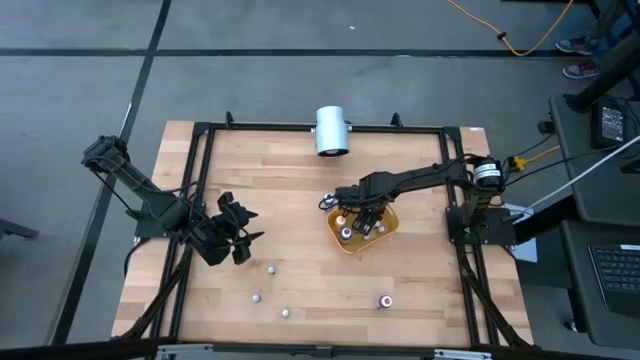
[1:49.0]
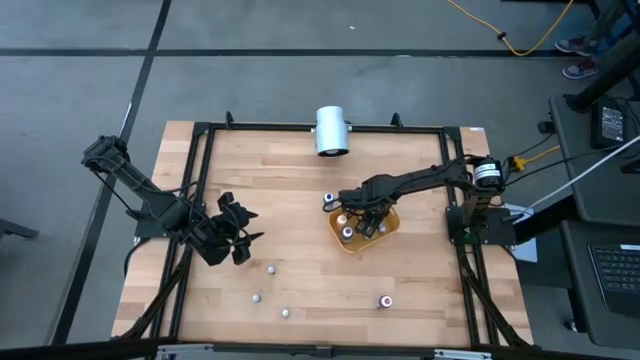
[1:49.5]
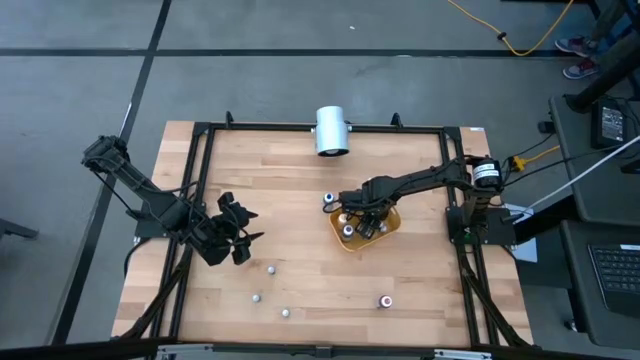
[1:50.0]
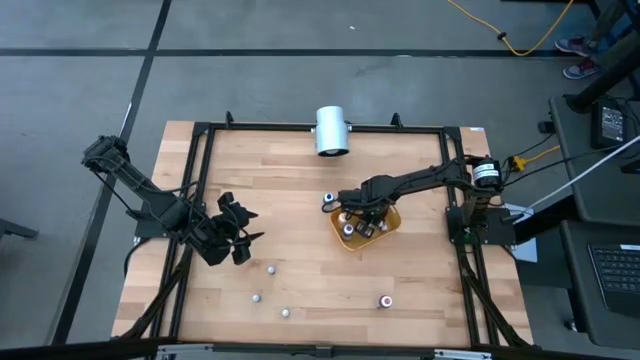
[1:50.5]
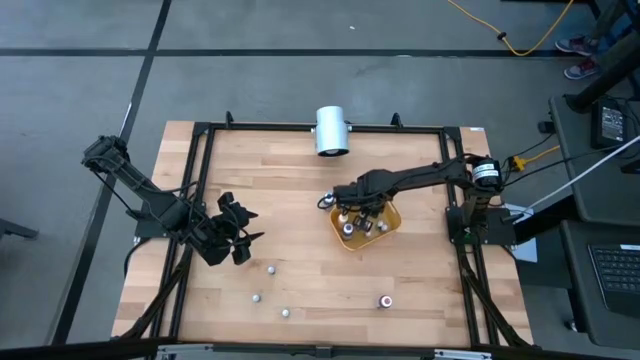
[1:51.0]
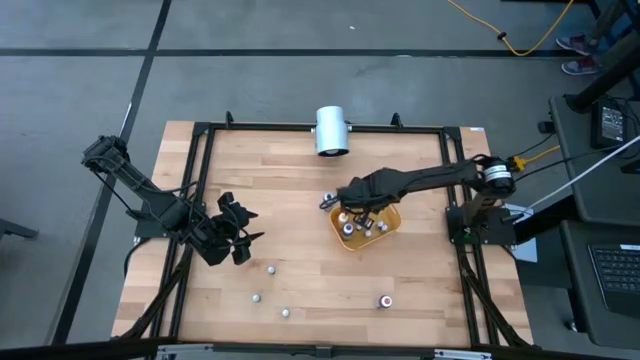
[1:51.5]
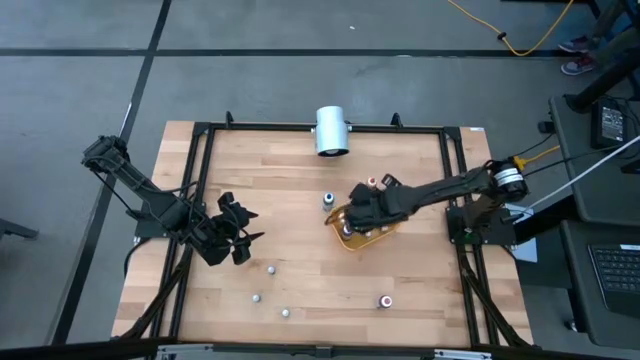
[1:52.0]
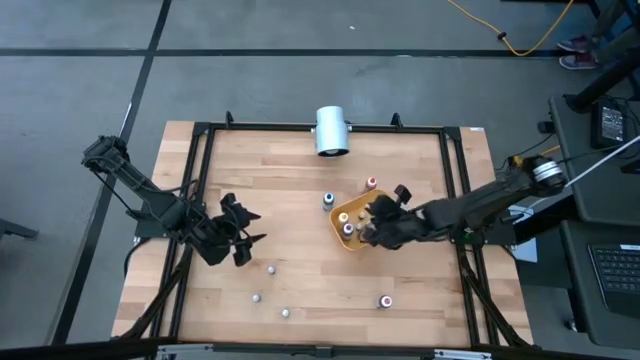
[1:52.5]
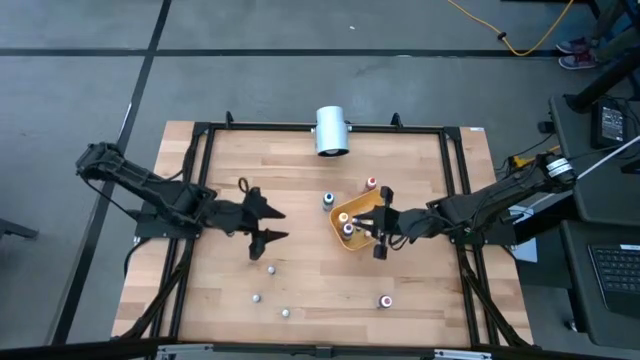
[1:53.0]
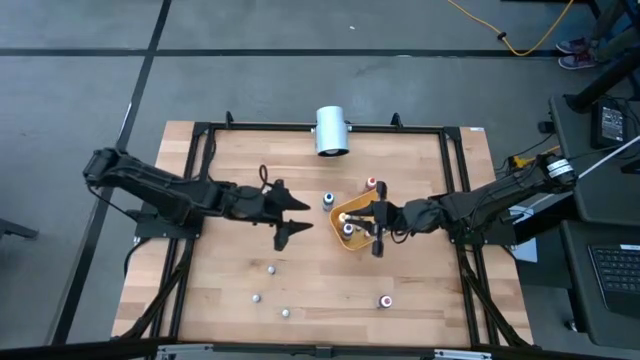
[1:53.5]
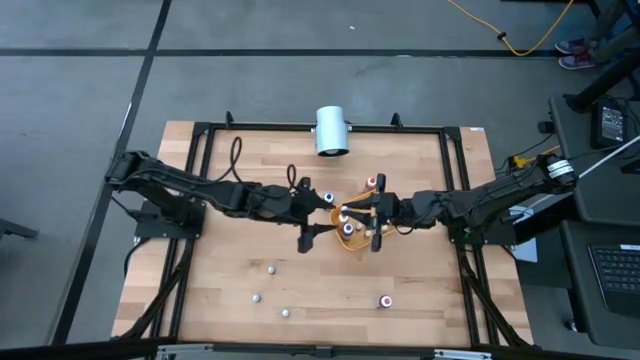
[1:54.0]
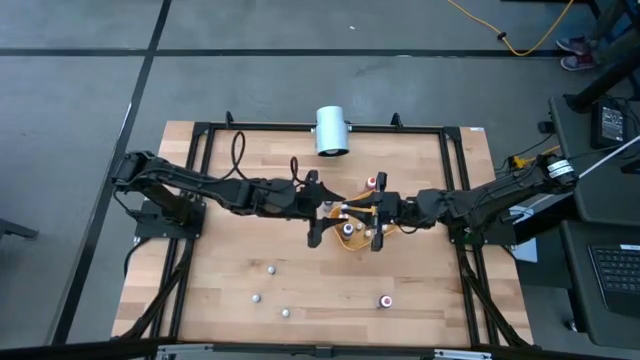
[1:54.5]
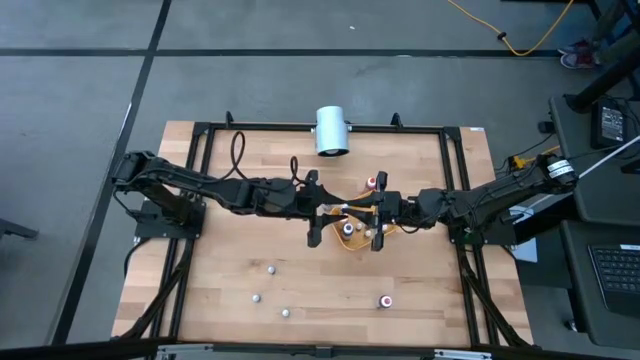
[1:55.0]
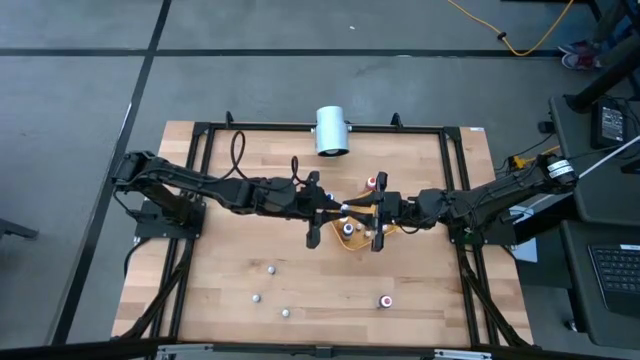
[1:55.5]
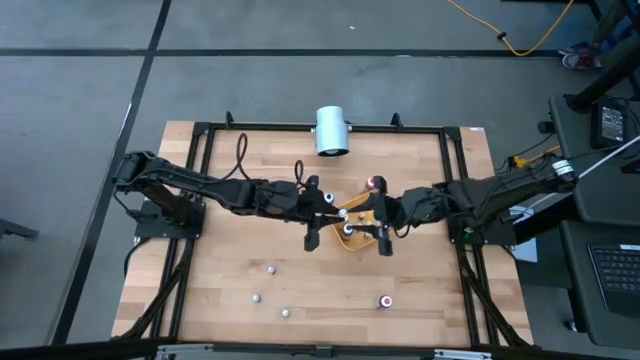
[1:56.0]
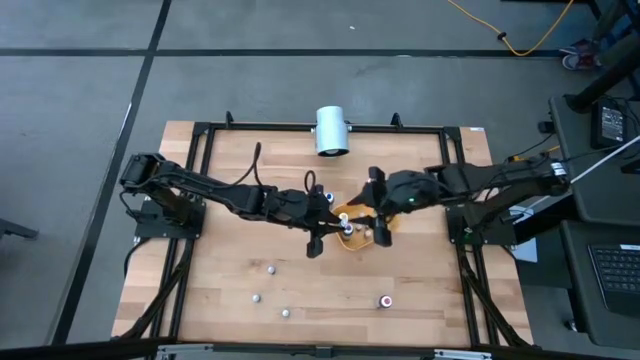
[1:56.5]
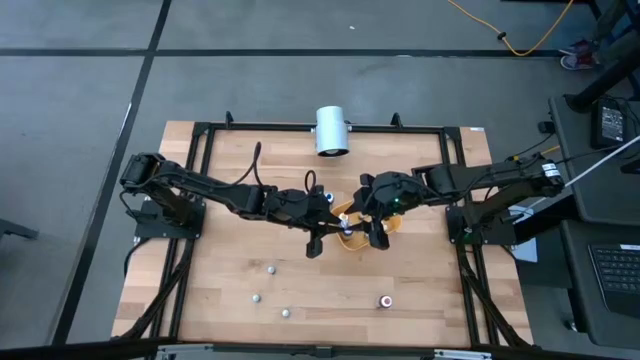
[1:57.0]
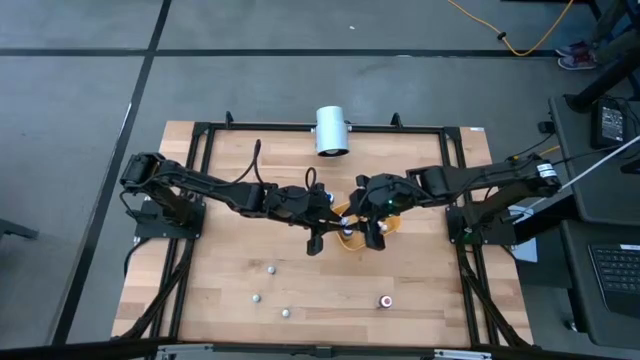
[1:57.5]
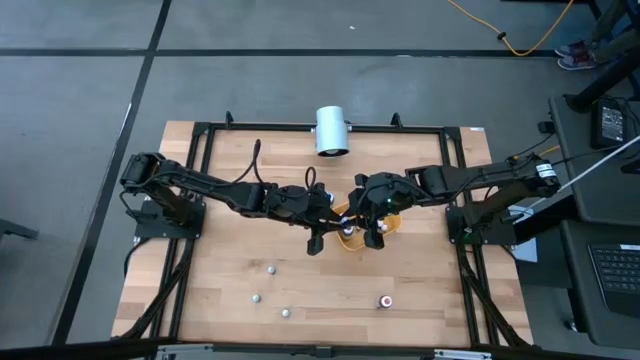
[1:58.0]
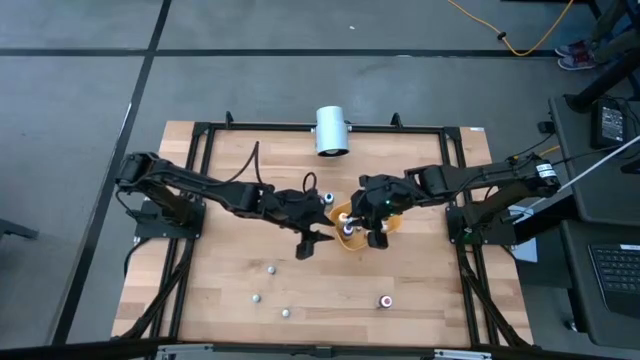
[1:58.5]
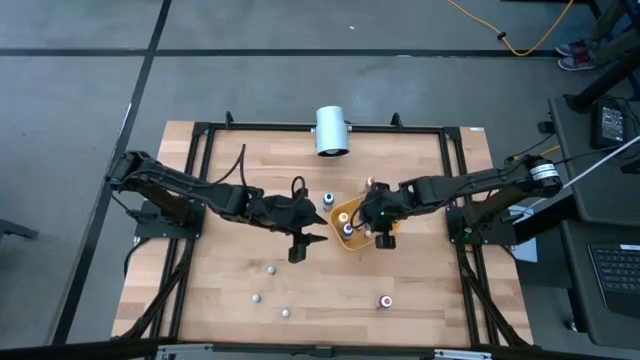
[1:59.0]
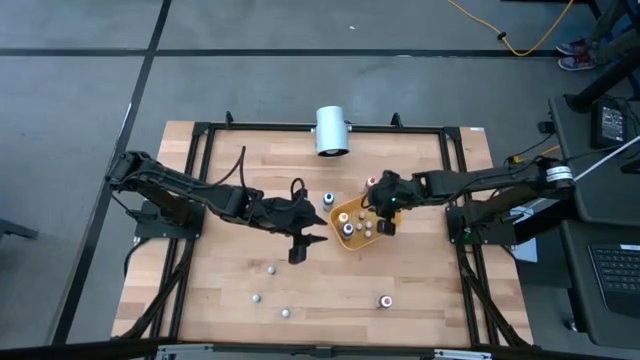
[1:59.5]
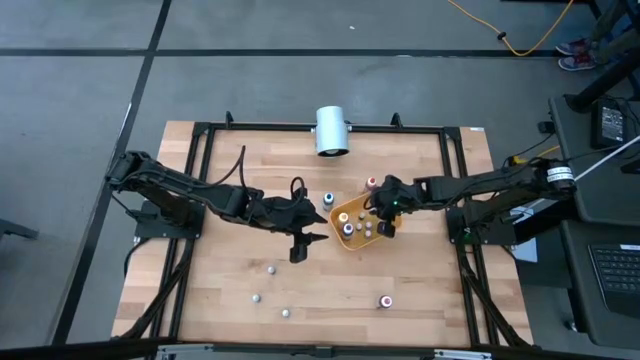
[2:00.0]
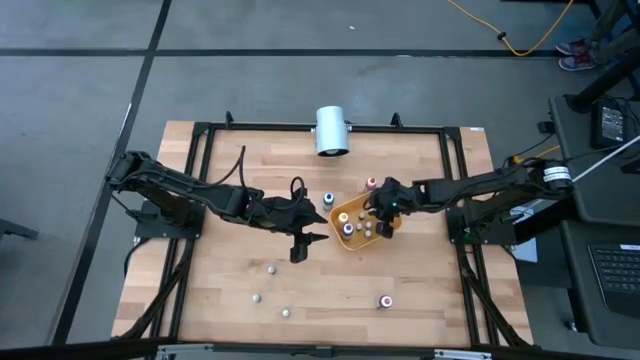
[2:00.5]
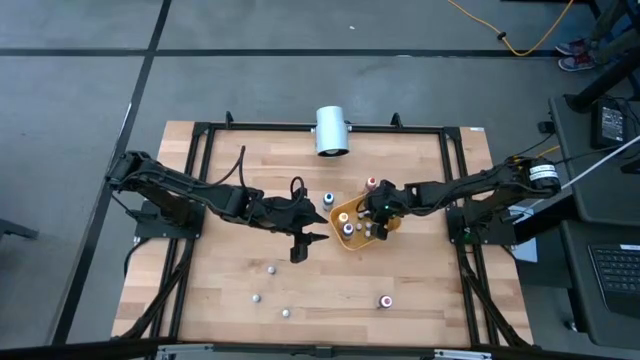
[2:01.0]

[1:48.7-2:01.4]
Task: Pick & Place food coloring
Adjust the red food coloring bottle in the yellow bin

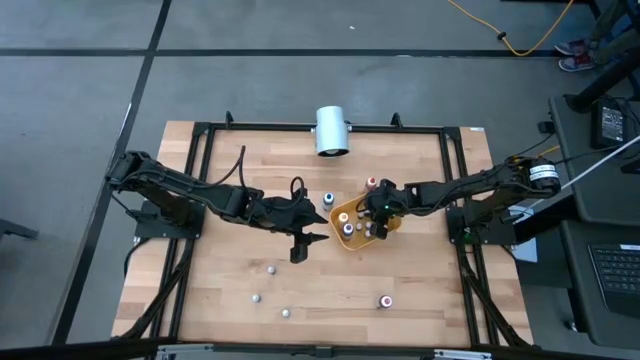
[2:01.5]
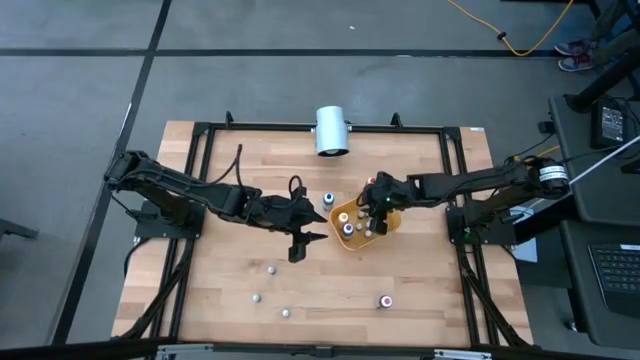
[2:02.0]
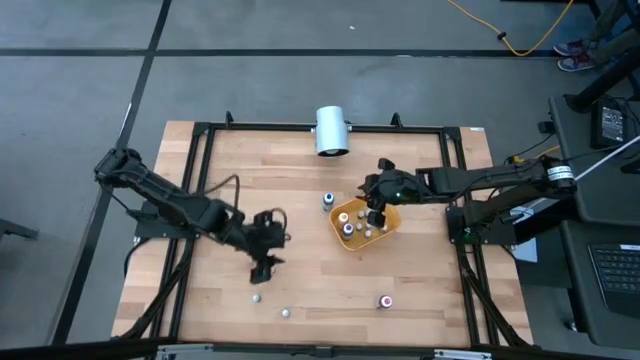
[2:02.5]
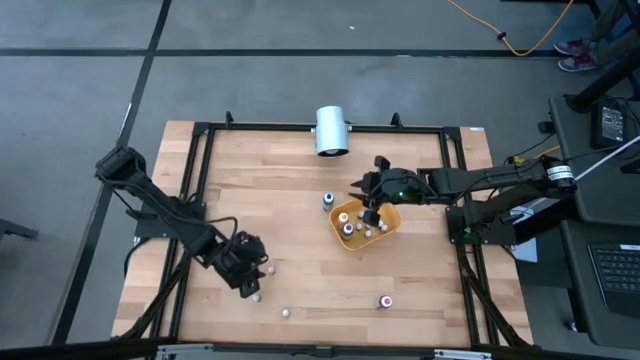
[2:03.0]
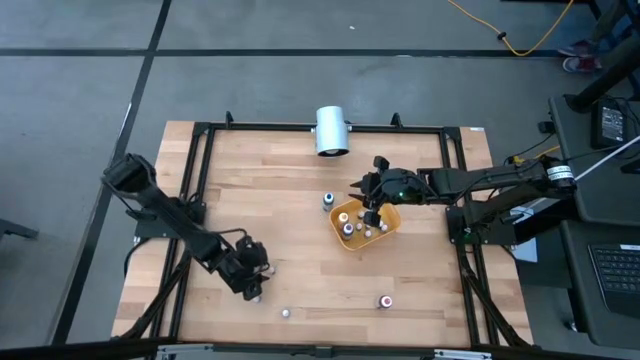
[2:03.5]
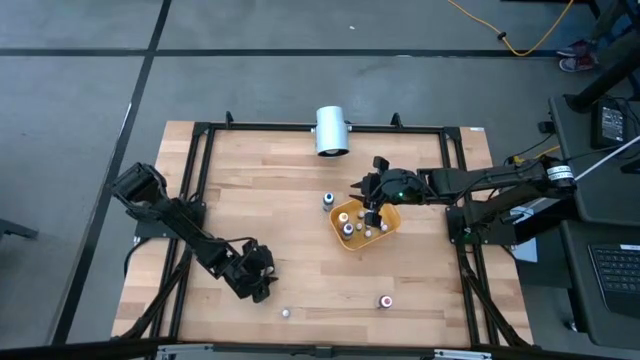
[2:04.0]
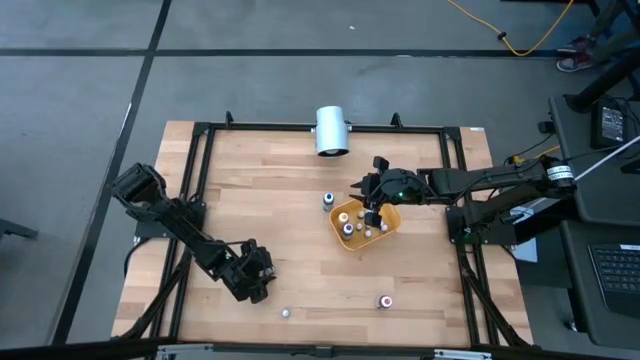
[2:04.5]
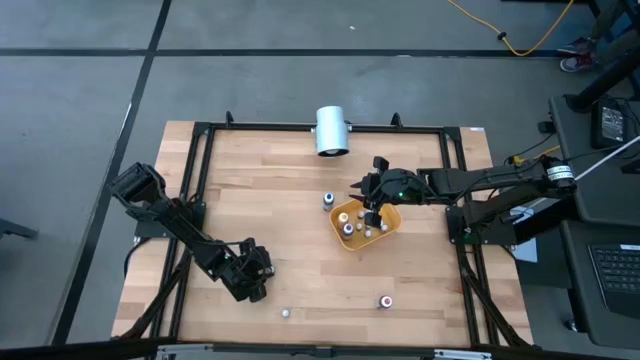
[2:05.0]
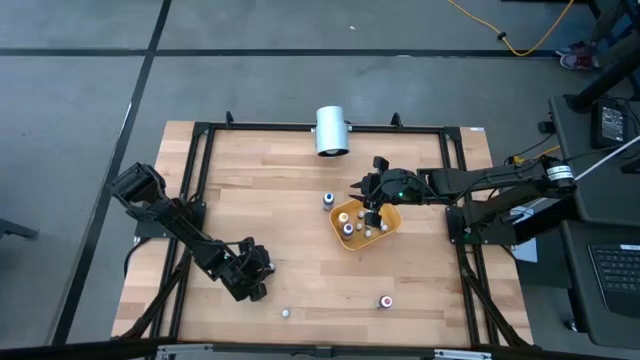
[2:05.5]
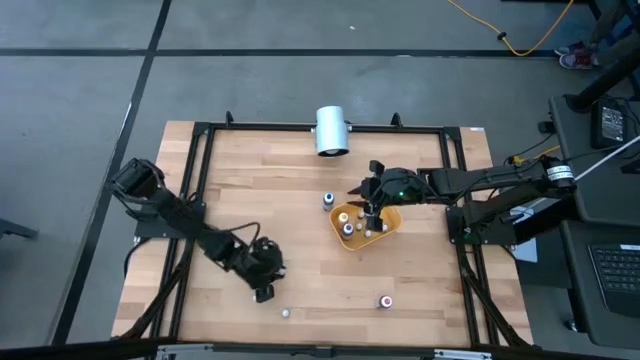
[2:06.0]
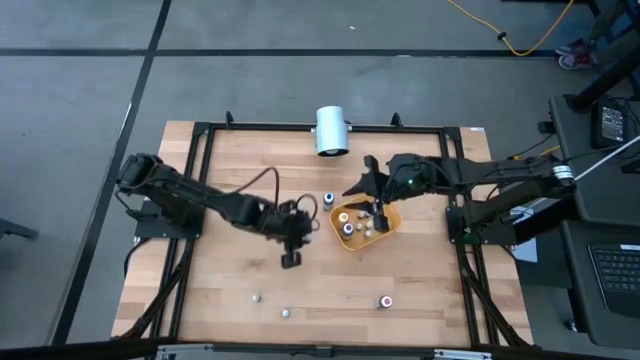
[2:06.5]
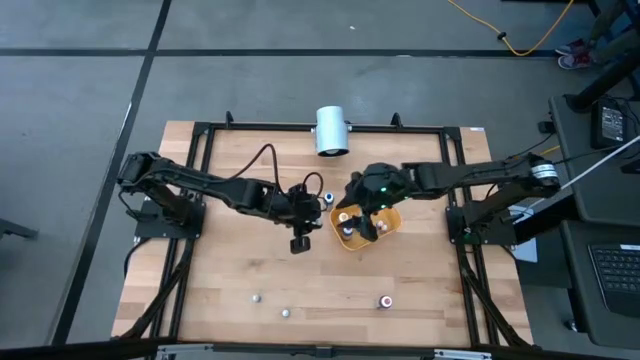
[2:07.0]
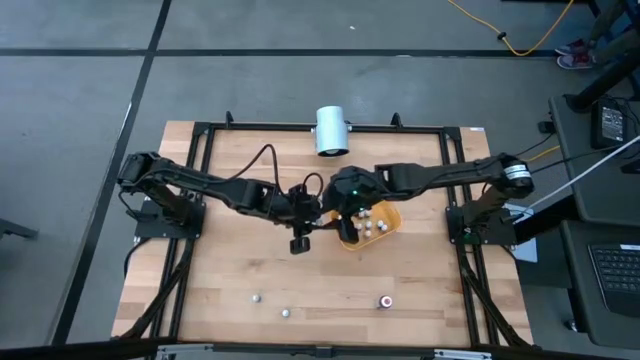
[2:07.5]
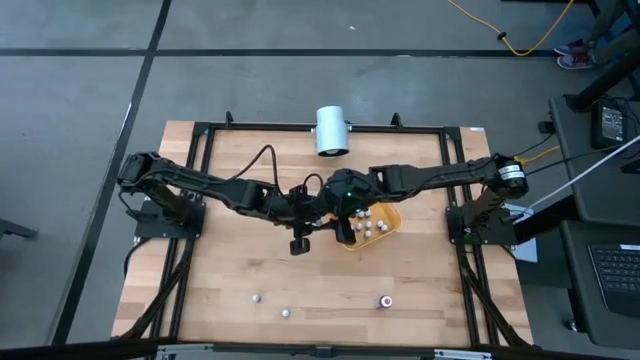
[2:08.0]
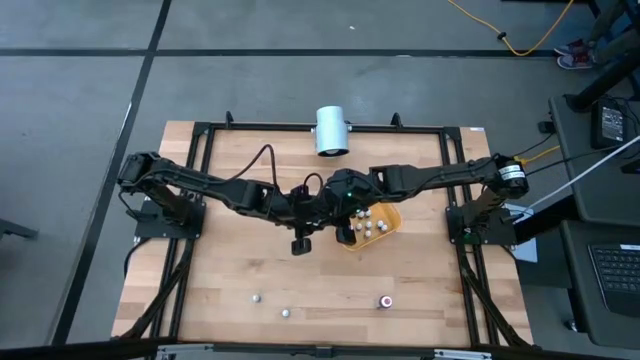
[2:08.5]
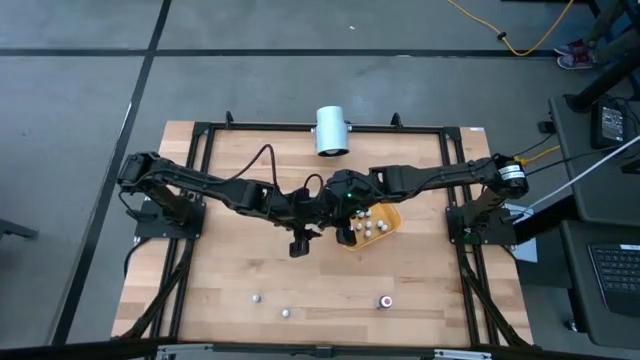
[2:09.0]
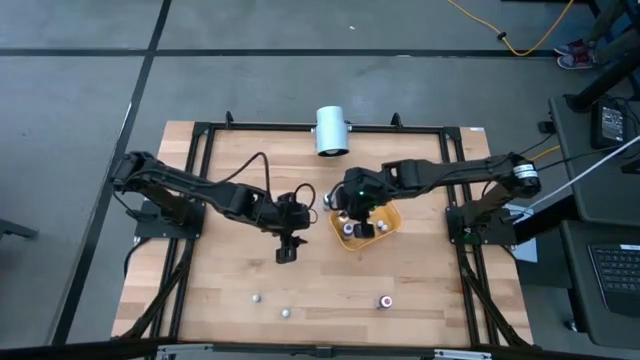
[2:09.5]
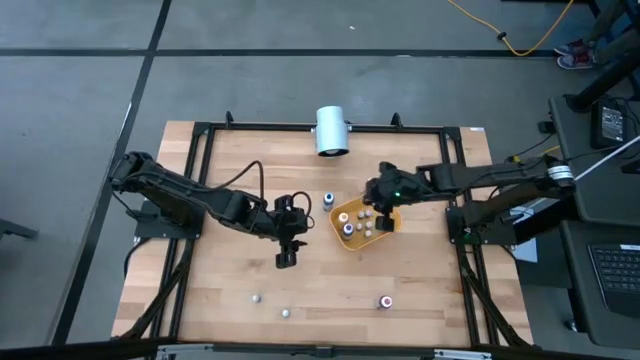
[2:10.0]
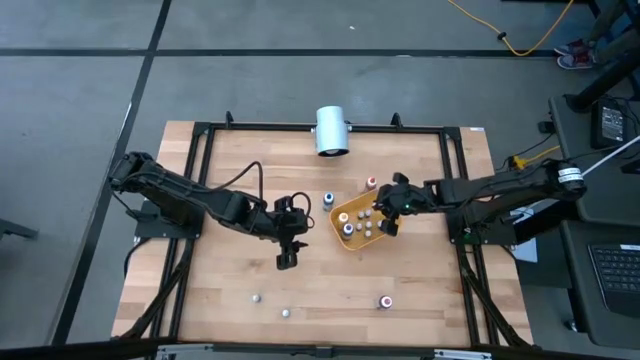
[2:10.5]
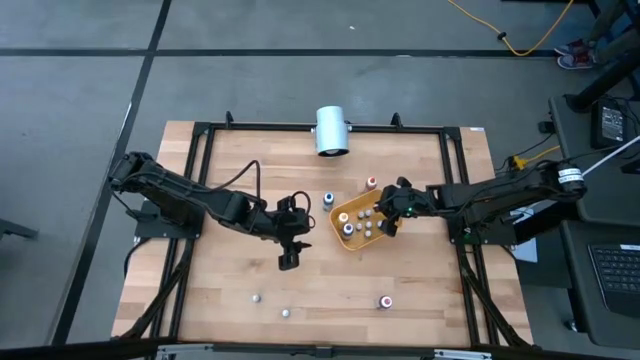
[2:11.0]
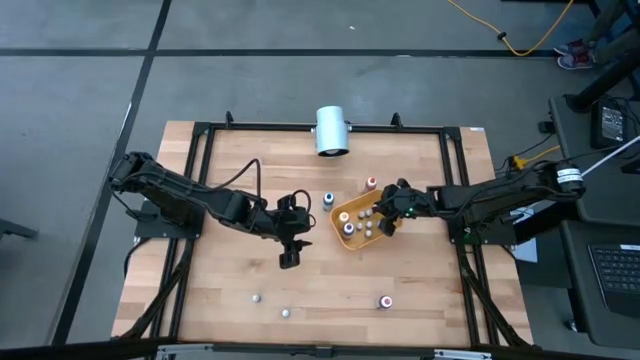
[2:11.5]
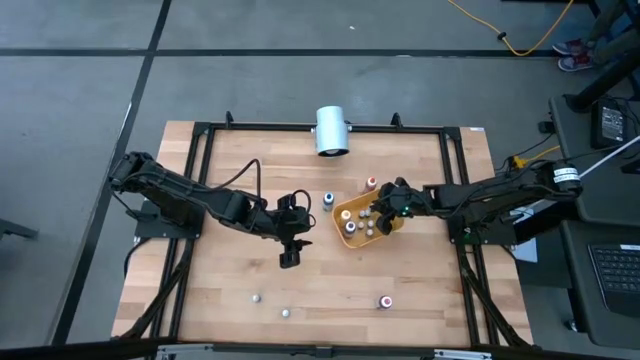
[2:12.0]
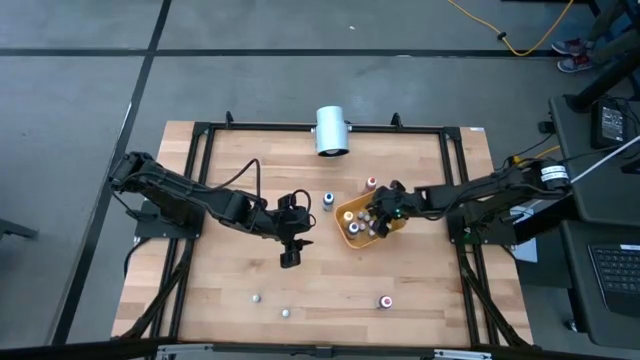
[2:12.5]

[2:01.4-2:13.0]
Put the small blue food coloring bottle into the yellow bin
